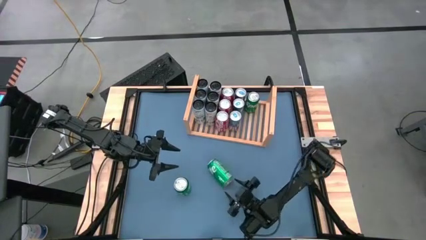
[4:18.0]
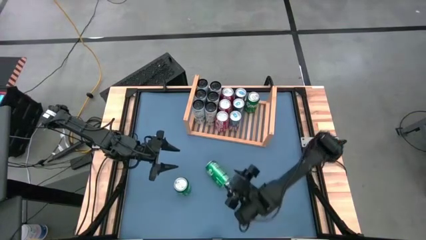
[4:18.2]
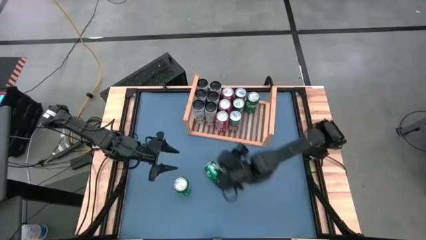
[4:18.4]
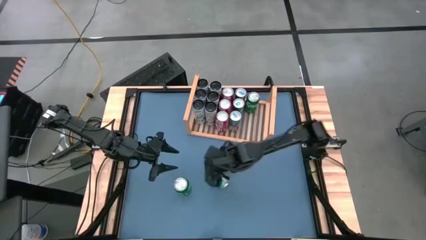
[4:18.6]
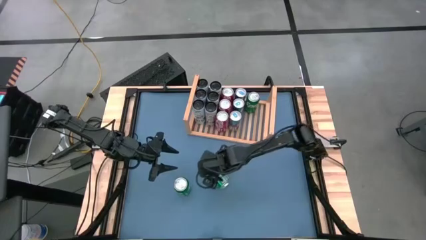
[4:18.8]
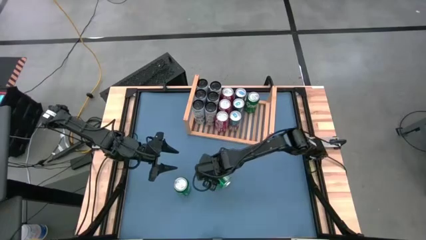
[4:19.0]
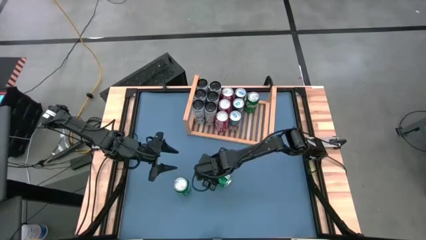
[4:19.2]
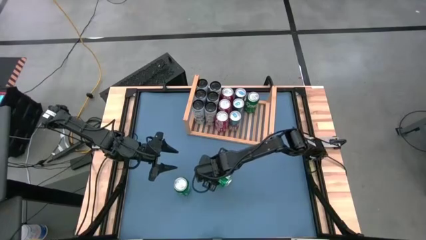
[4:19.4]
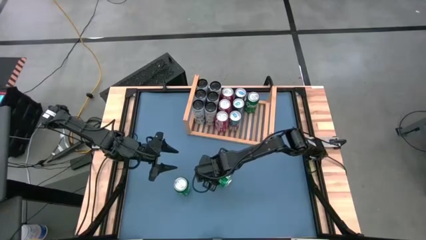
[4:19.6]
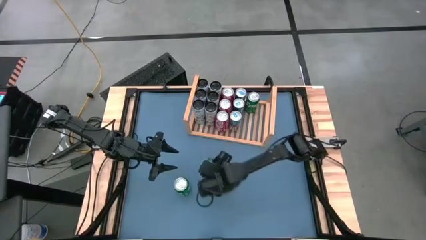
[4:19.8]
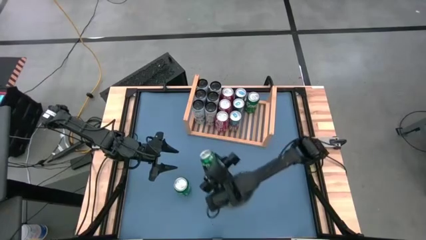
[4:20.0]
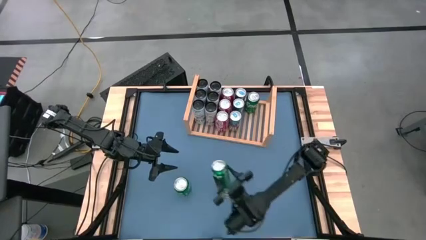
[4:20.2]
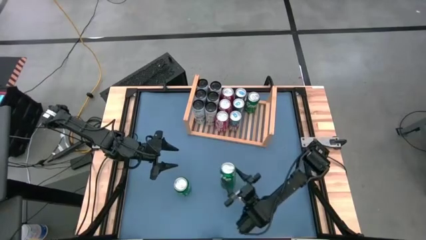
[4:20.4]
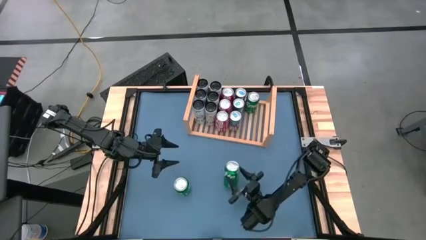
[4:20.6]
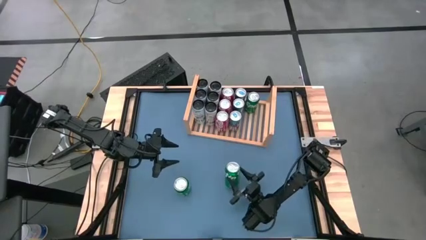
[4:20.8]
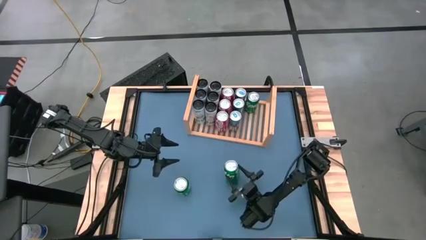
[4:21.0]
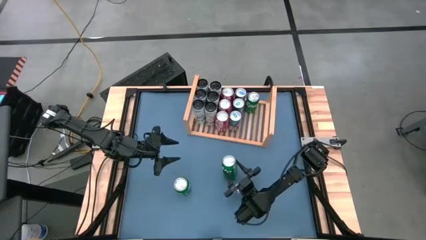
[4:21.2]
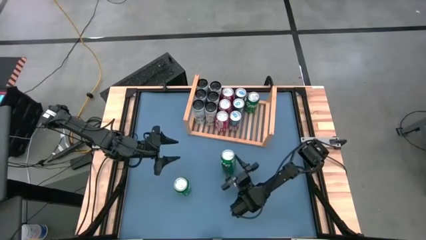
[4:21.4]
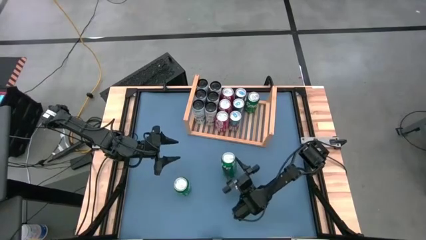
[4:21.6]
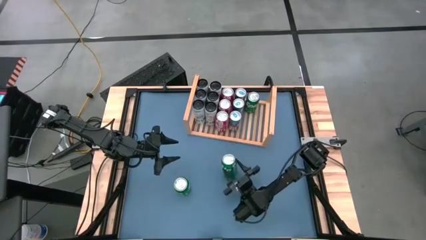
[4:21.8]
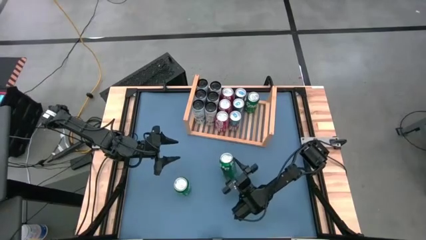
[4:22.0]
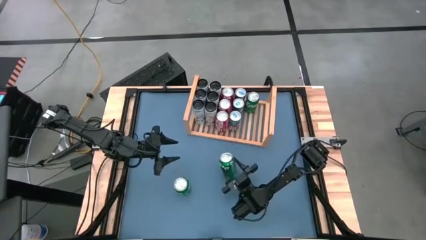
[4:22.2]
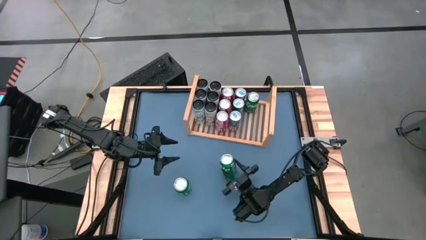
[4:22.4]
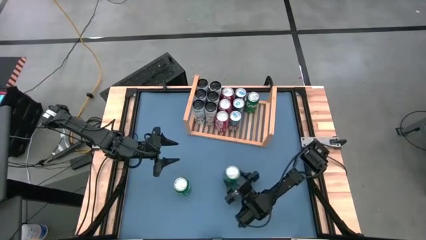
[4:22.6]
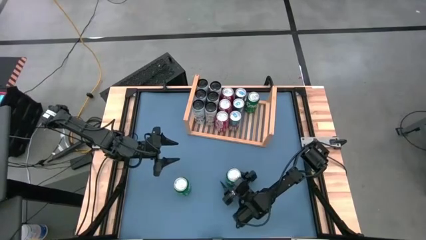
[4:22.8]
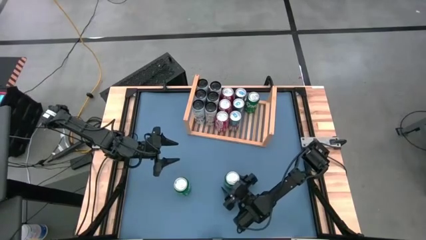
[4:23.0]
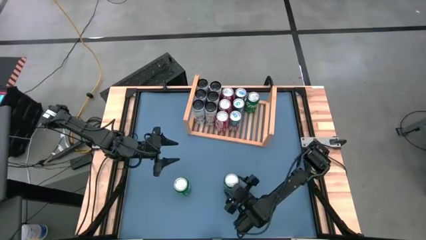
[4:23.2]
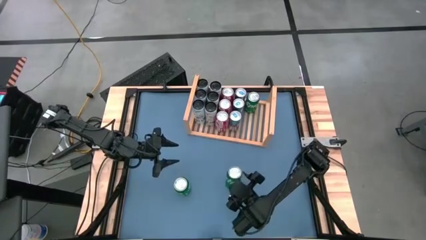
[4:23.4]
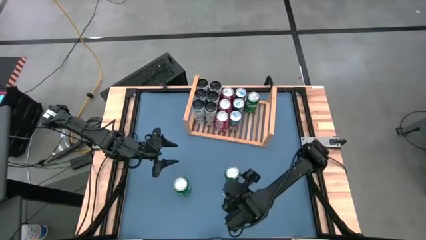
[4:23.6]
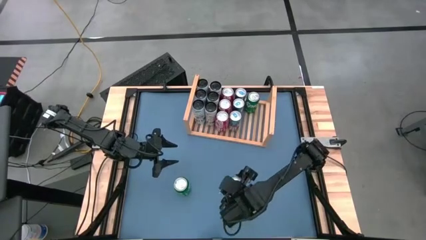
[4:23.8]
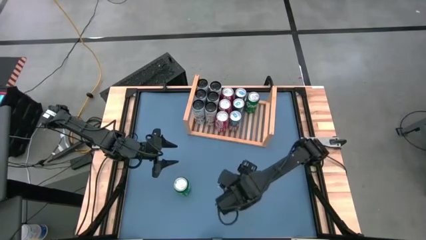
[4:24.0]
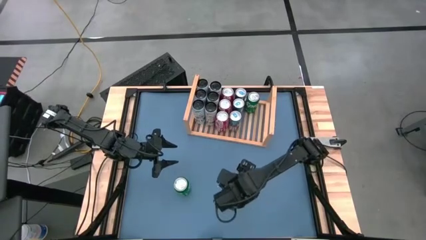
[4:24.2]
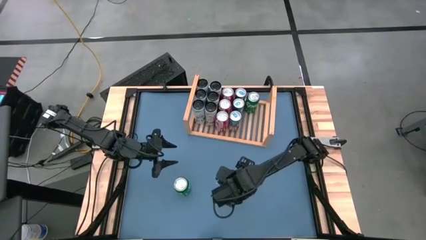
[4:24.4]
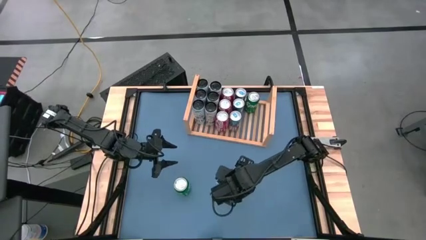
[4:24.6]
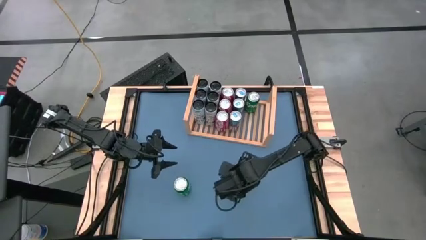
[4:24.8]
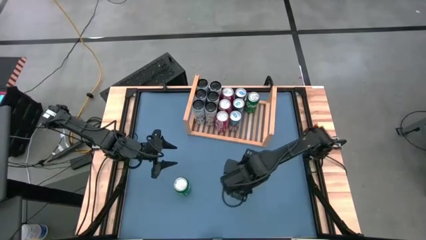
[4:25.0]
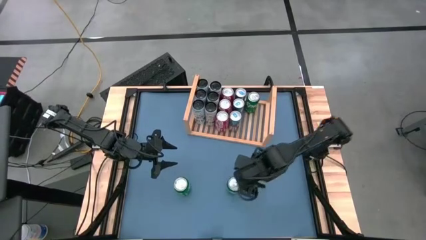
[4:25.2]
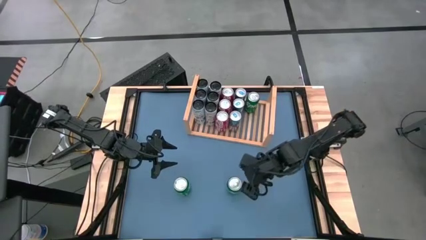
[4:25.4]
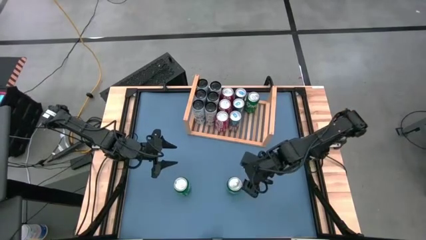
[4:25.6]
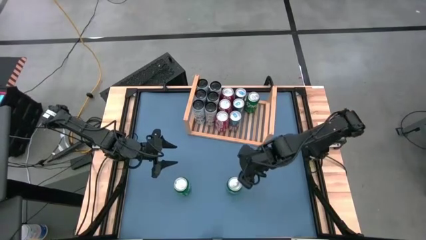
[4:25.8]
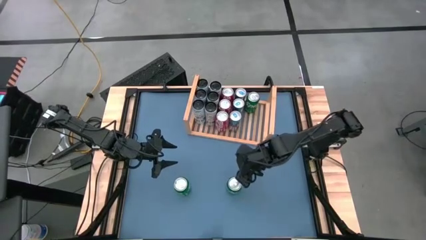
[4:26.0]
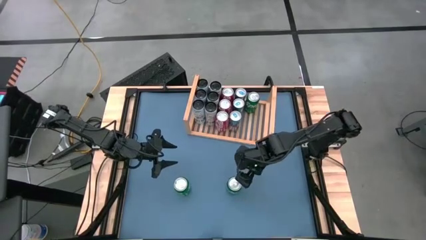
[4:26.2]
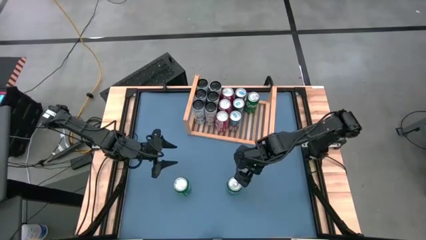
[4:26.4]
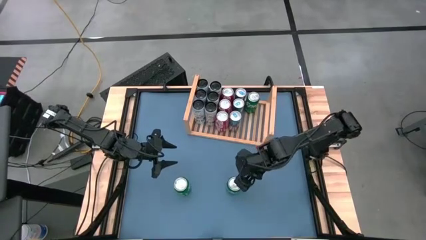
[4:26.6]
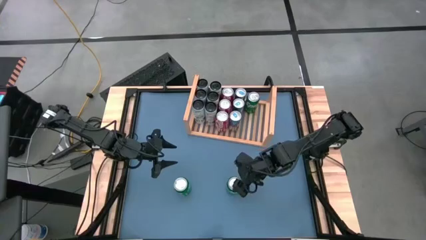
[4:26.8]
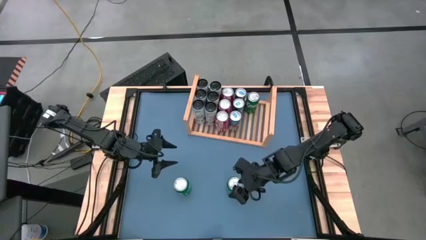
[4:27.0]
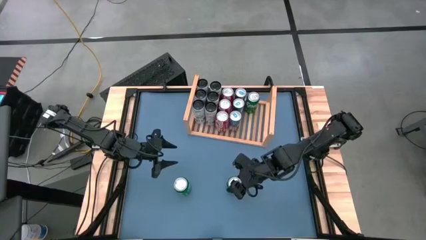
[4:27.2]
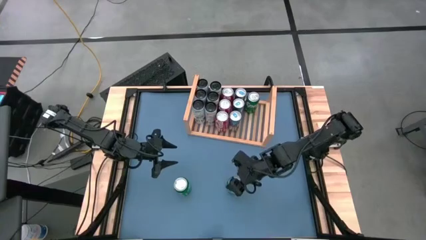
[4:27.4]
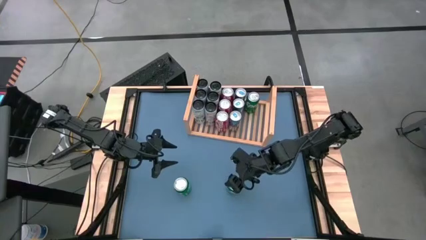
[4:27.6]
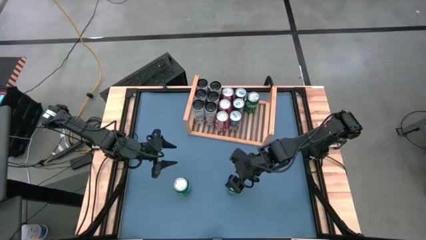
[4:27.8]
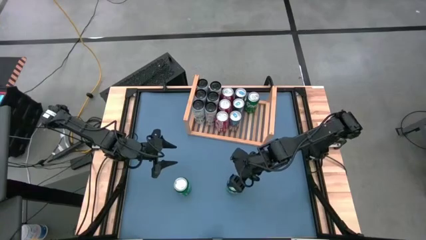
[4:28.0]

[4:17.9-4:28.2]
Task: Place canned beverage on shelf
Put the green soda can on the shelf aligned with the other green soda can

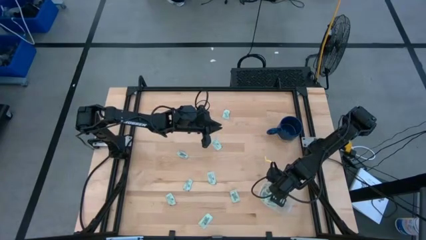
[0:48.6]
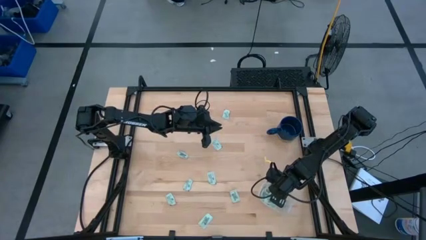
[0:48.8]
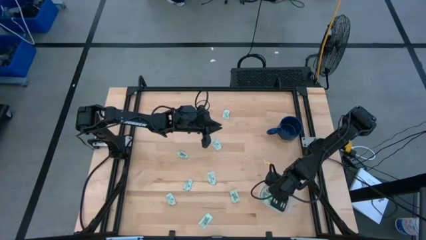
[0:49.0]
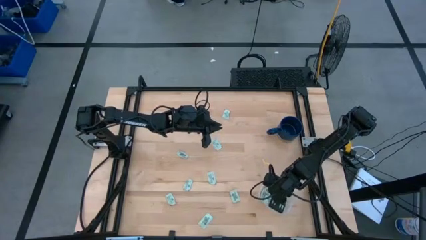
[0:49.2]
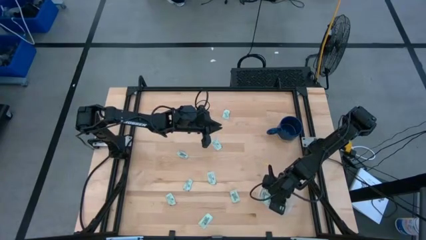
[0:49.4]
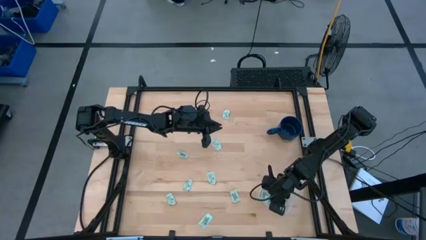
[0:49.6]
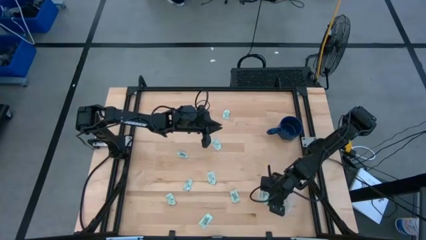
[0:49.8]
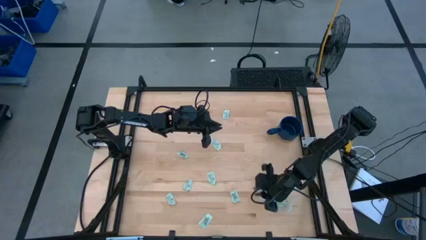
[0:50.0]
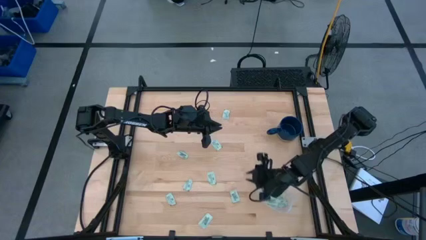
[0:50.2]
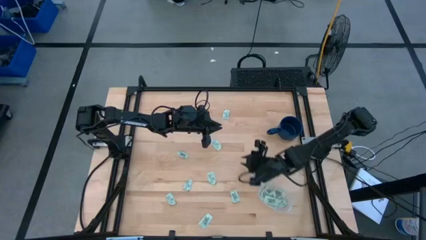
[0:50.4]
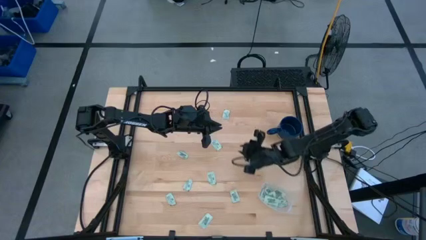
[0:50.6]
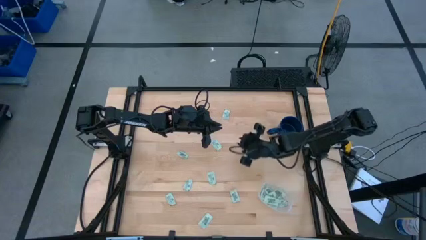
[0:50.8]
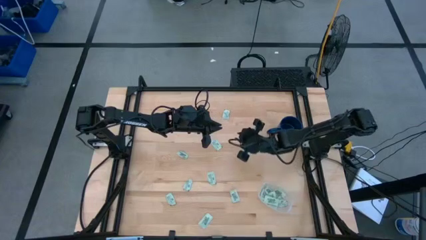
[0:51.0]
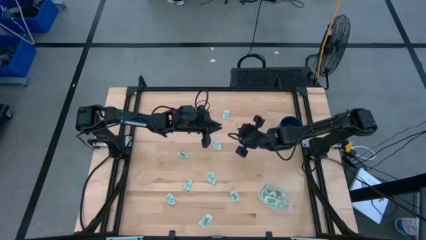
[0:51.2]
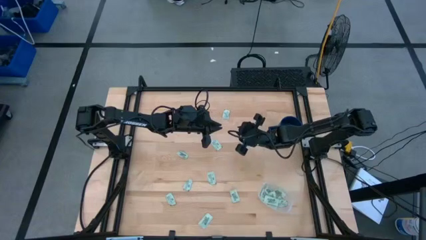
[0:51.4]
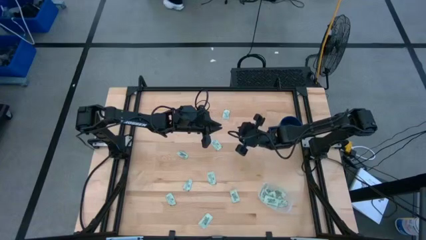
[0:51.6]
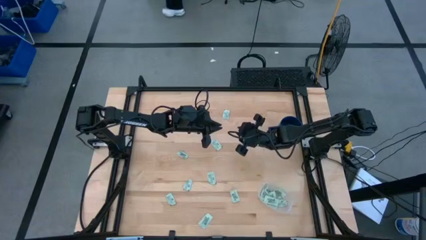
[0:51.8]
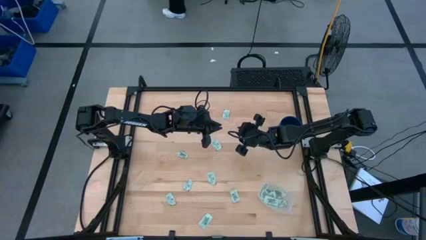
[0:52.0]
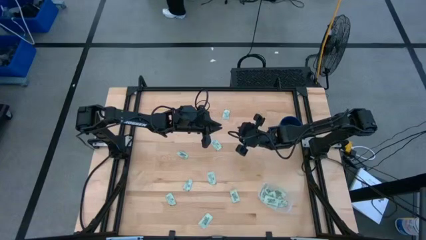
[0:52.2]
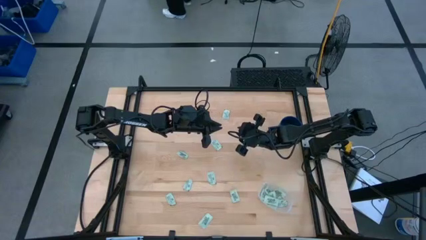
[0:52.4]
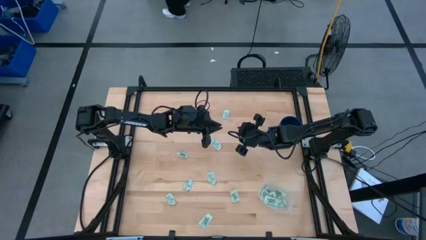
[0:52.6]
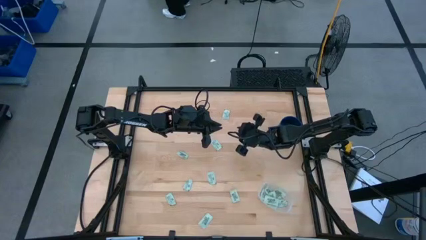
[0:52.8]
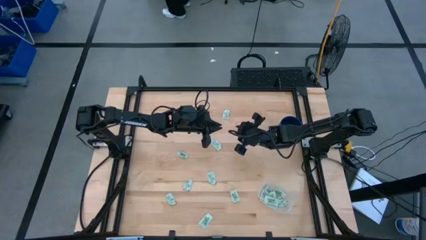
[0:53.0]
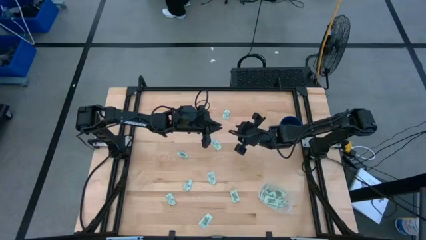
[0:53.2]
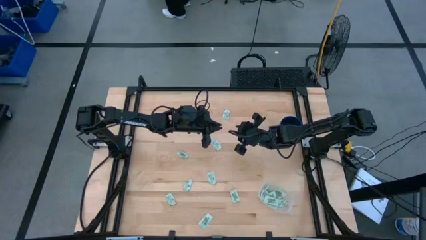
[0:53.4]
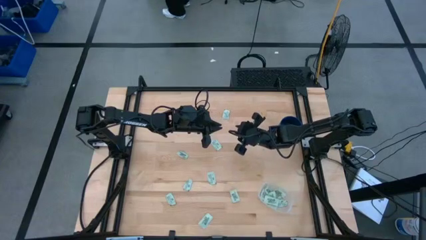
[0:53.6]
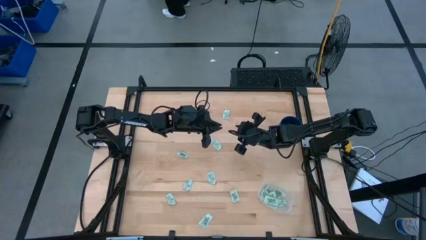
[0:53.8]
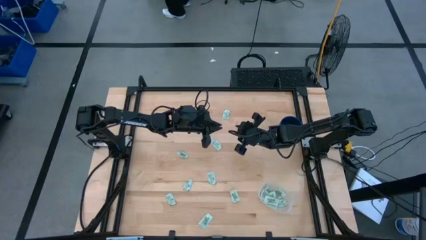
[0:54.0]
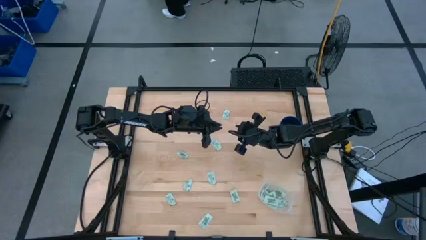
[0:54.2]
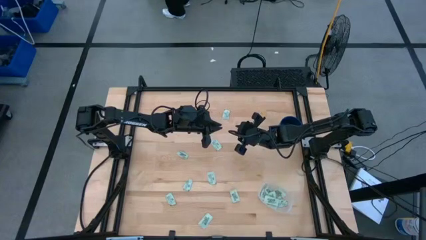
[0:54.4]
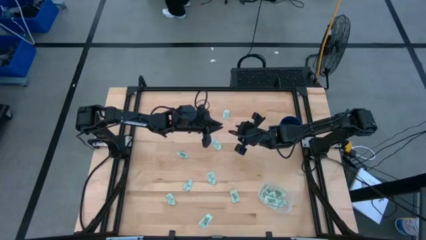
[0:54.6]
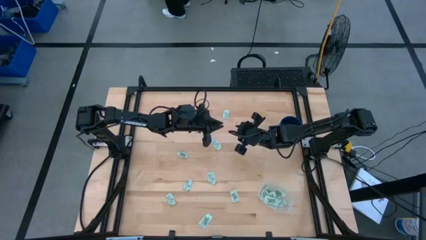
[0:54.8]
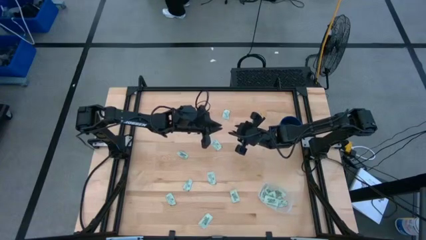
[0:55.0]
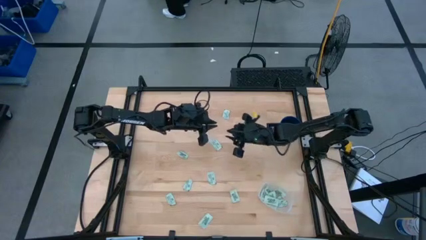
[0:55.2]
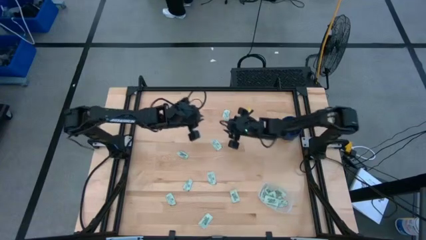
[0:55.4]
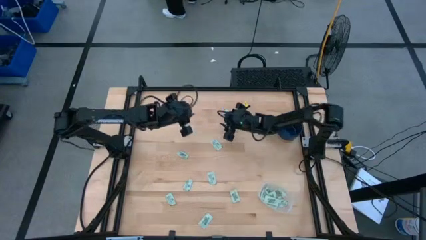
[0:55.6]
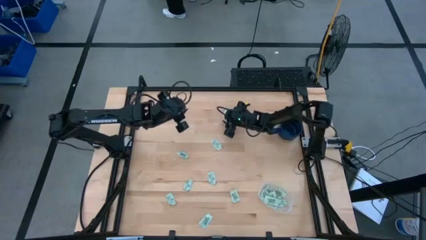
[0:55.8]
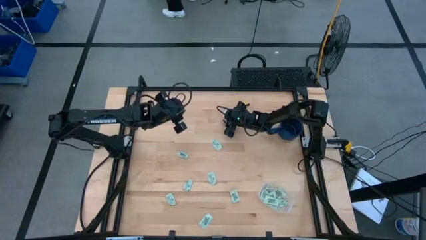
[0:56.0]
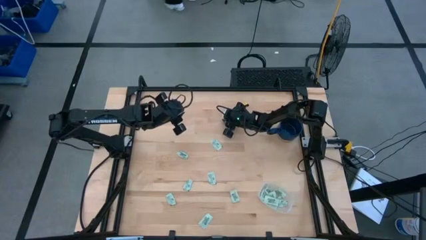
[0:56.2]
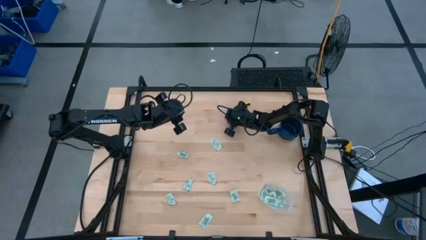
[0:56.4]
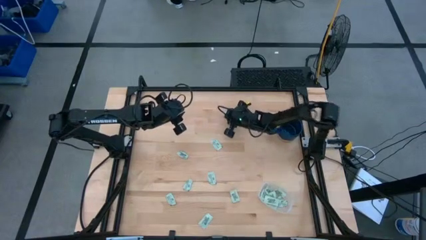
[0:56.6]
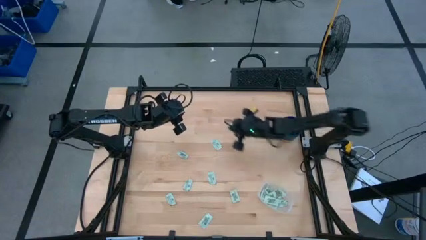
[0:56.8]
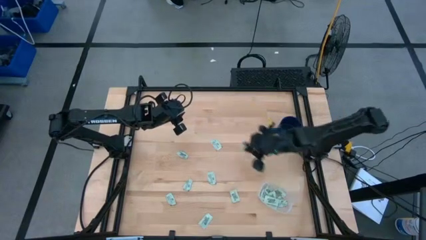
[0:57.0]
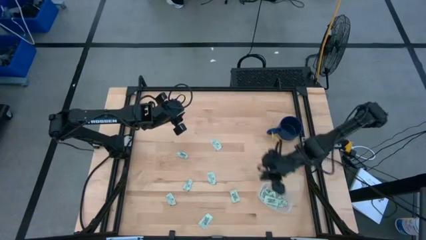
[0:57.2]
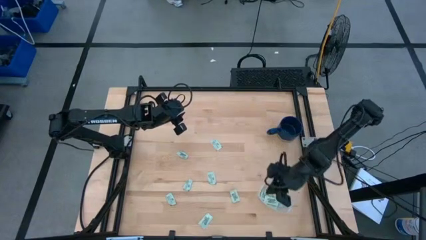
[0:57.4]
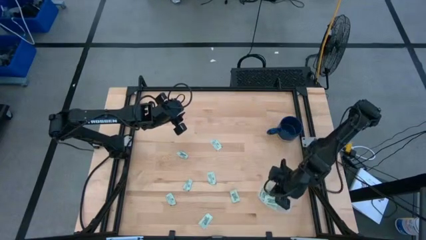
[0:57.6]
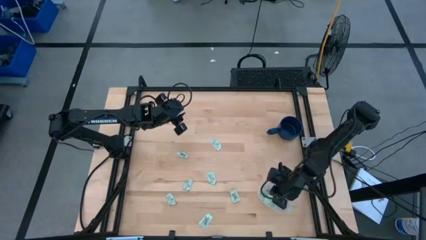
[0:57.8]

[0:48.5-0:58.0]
Task: Pick and place Stevia / Truvia into bins
Put the stevia packet into the transparent container
